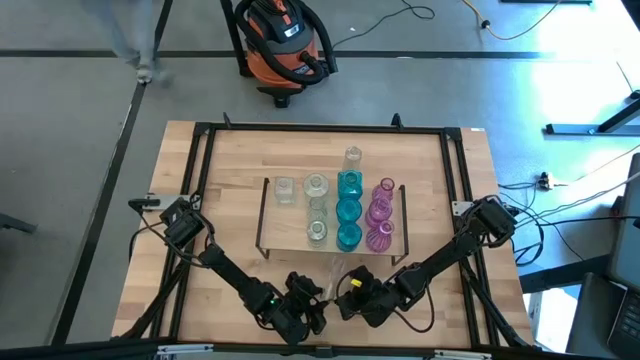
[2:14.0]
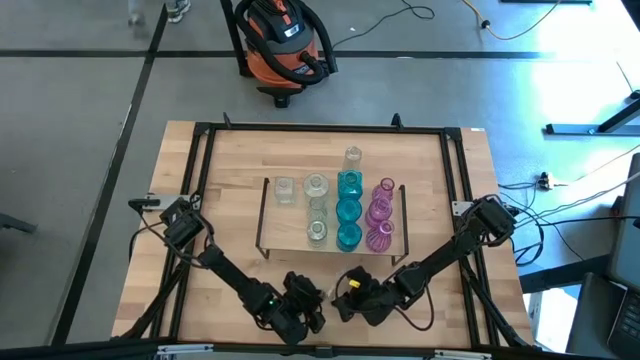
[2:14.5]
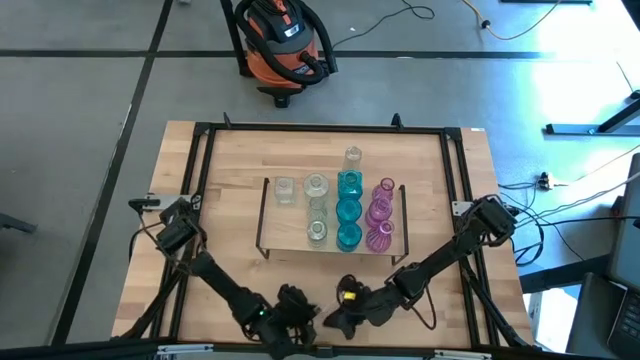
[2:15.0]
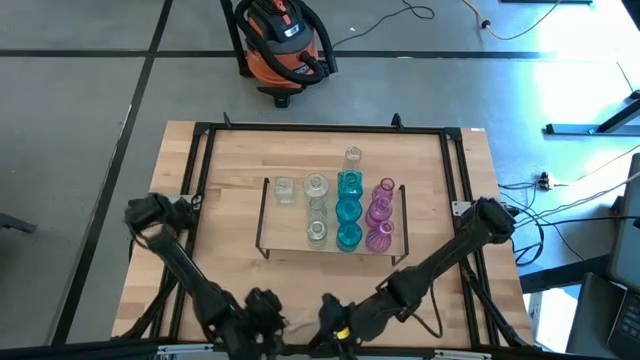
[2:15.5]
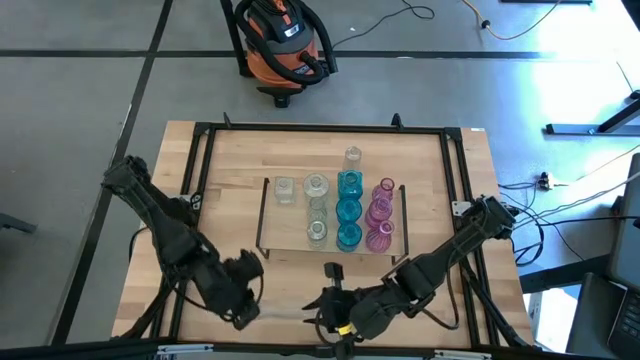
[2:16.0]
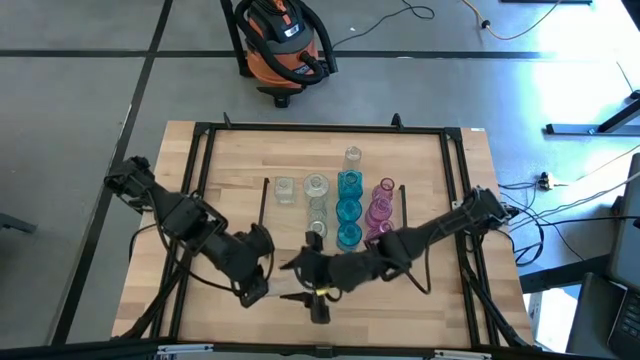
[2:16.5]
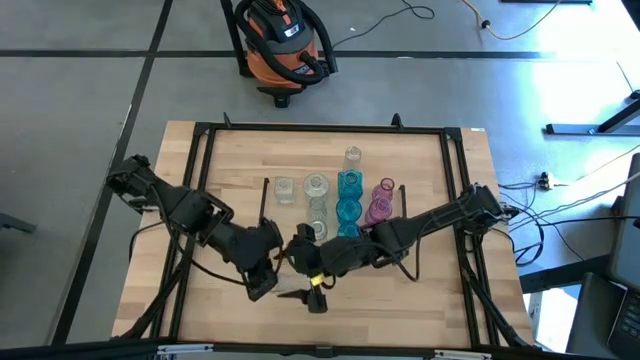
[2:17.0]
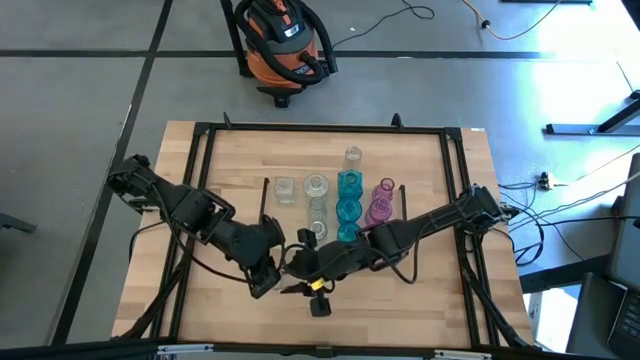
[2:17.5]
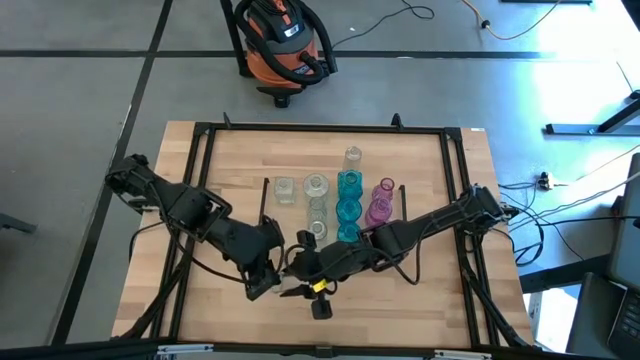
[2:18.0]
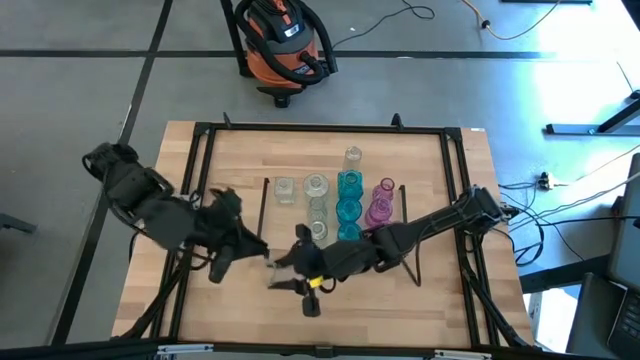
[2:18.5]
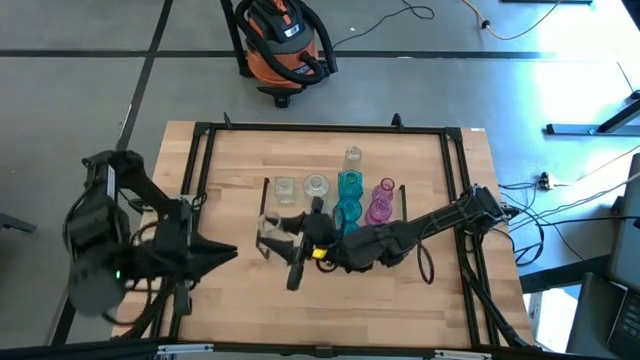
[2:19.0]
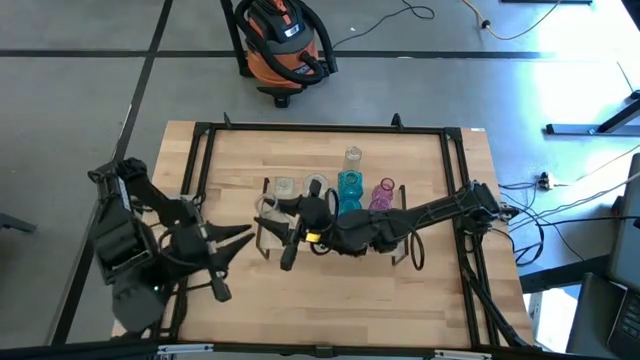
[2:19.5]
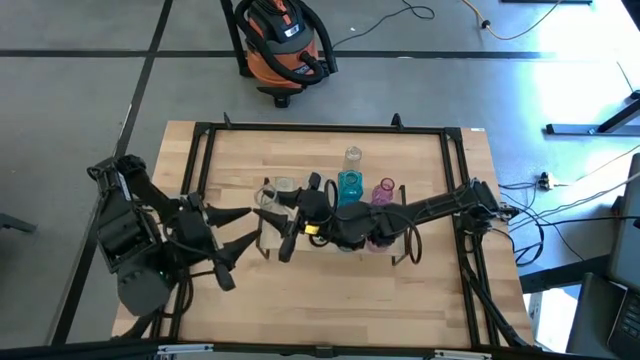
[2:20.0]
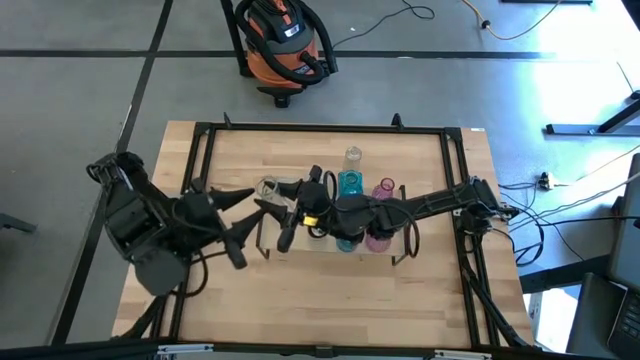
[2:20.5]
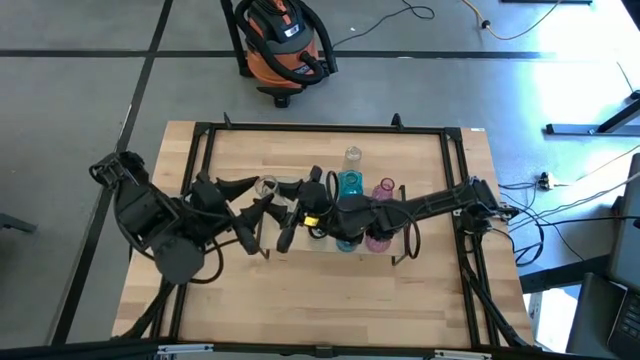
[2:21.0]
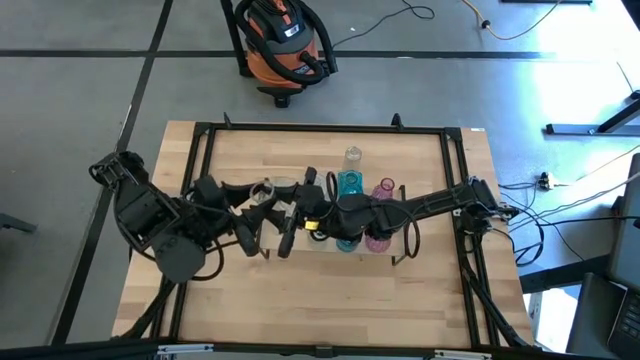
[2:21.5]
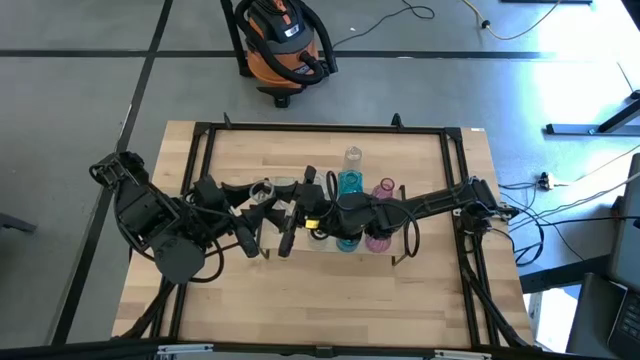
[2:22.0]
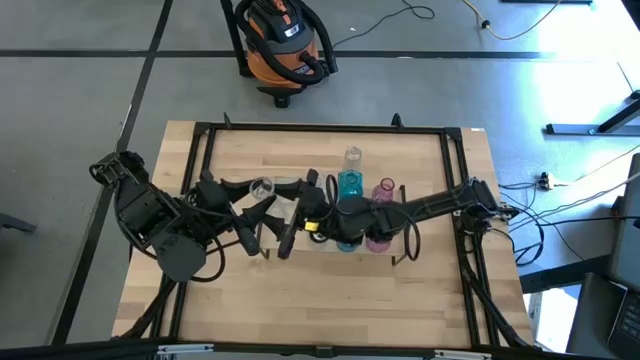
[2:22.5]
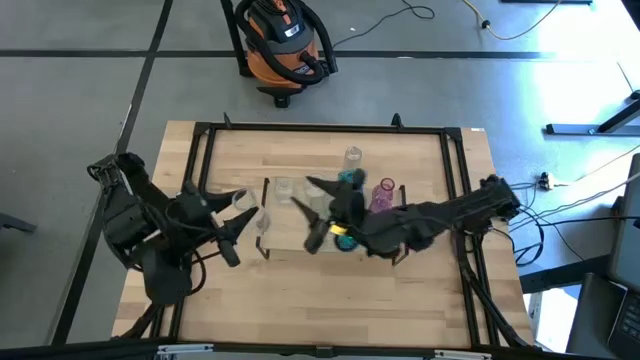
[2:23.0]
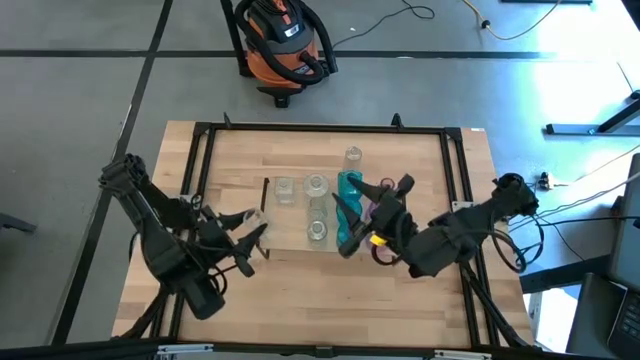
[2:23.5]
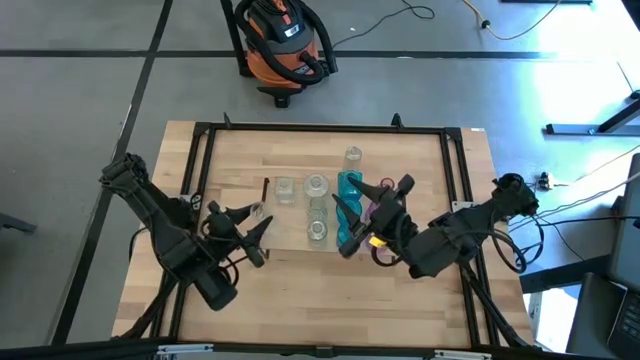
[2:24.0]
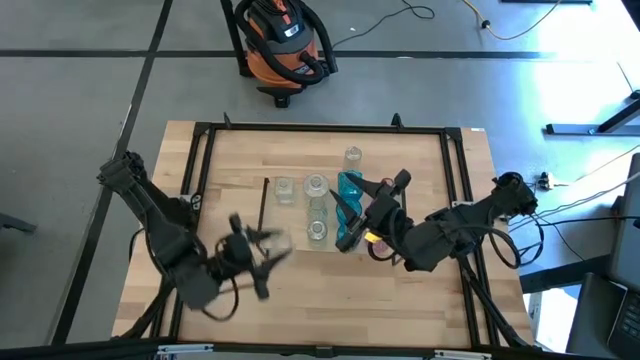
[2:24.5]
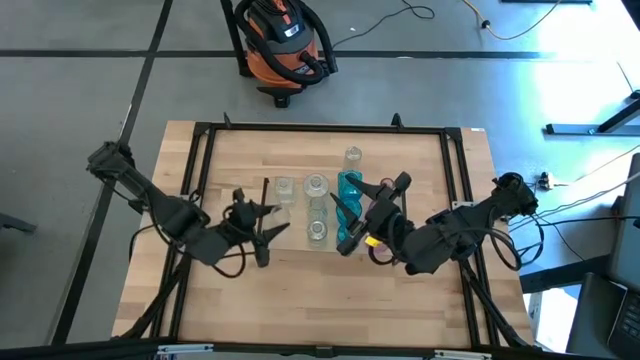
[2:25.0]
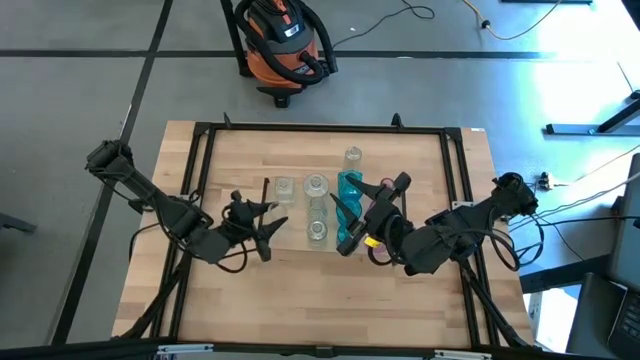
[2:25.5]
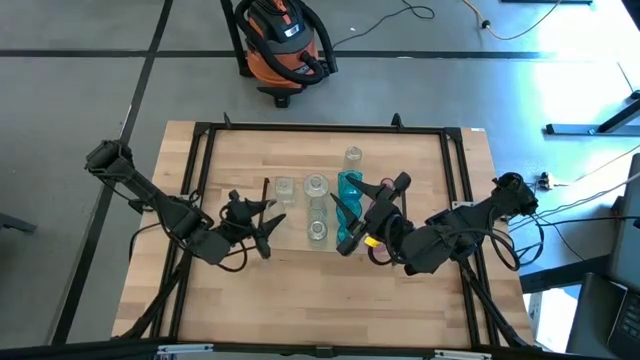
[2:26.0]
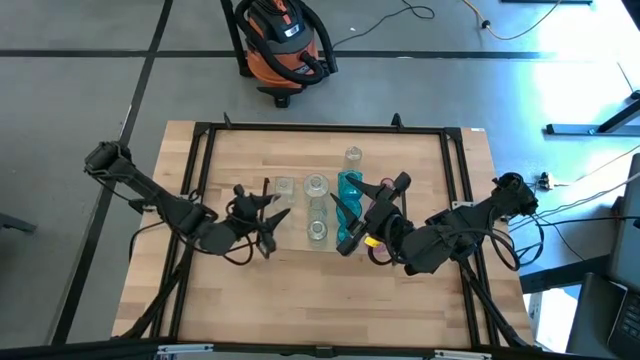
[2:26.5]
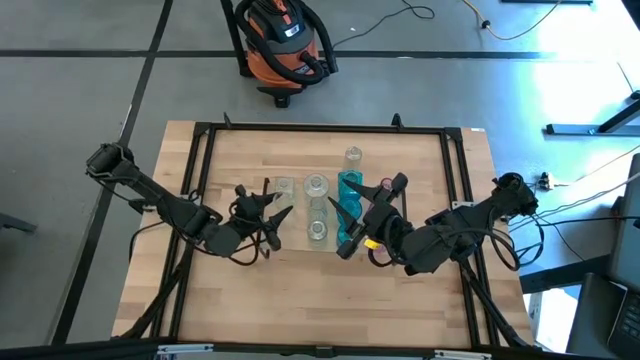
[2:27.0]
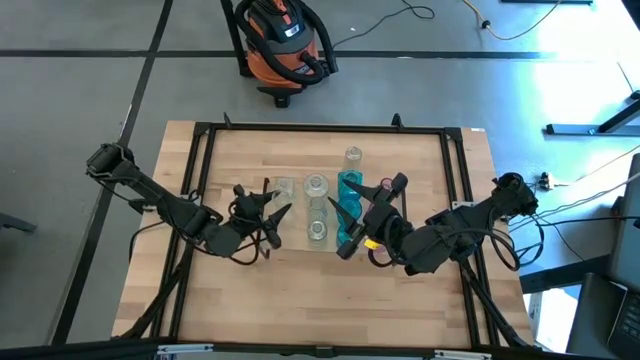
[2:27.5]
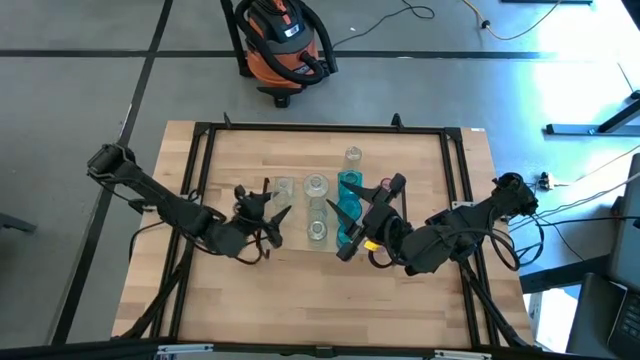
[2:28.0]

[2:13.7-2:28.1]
Task: sort vases onto shelf
Put the bottom transparent flower vase on the shelf

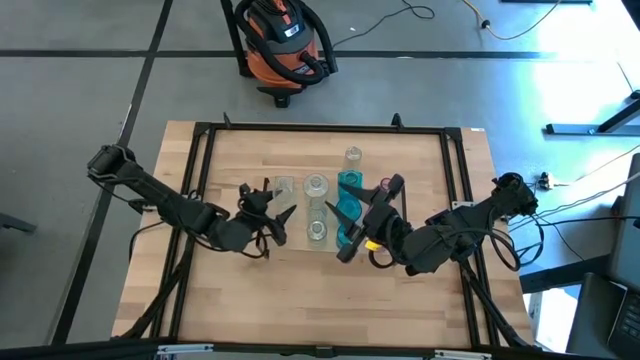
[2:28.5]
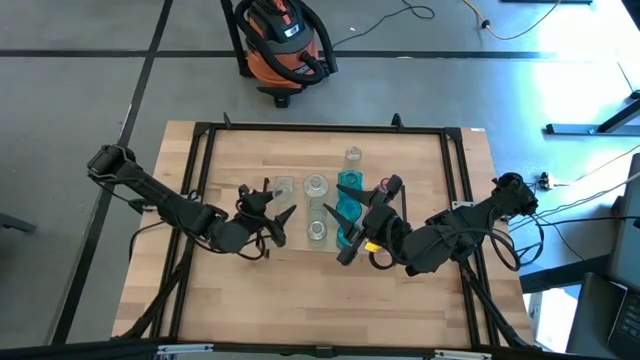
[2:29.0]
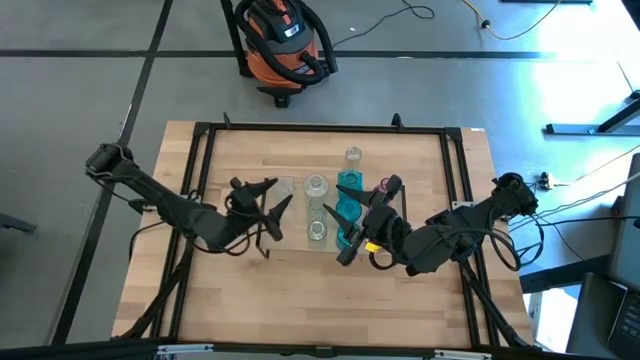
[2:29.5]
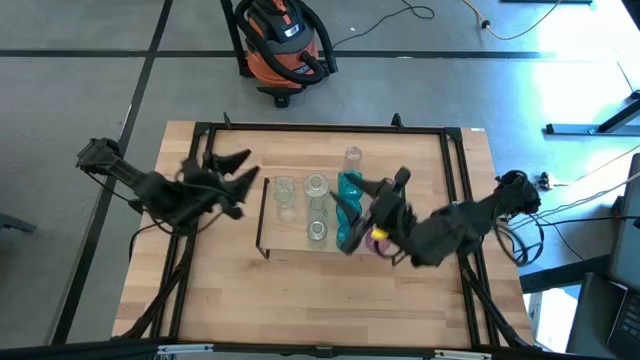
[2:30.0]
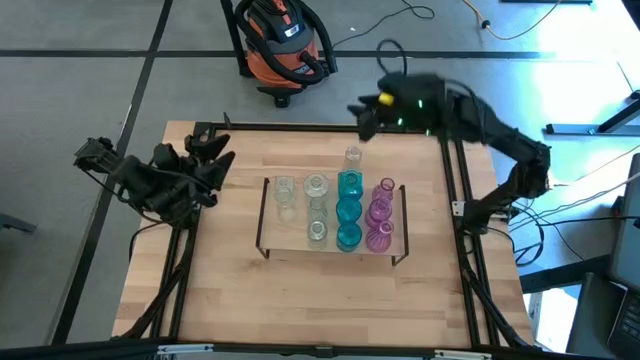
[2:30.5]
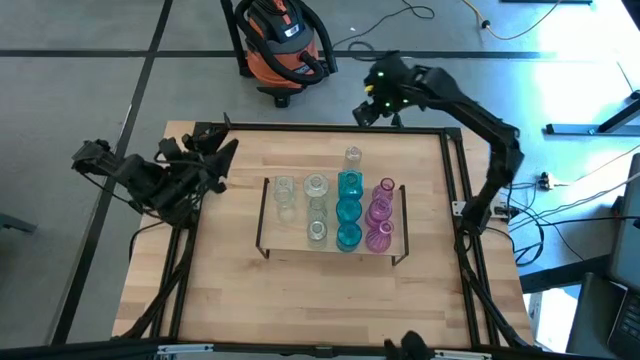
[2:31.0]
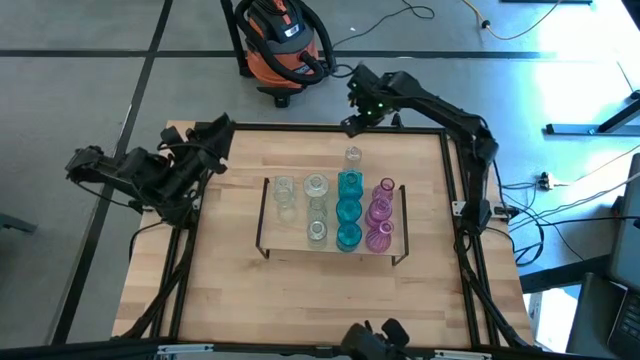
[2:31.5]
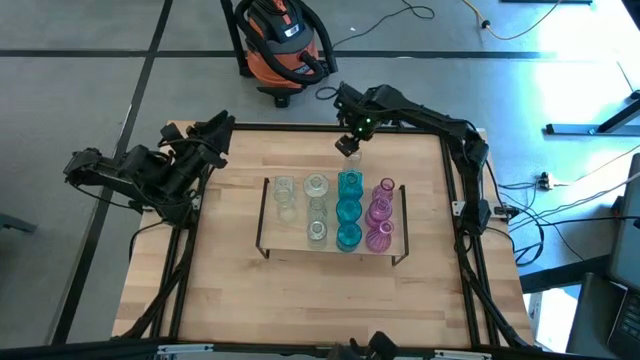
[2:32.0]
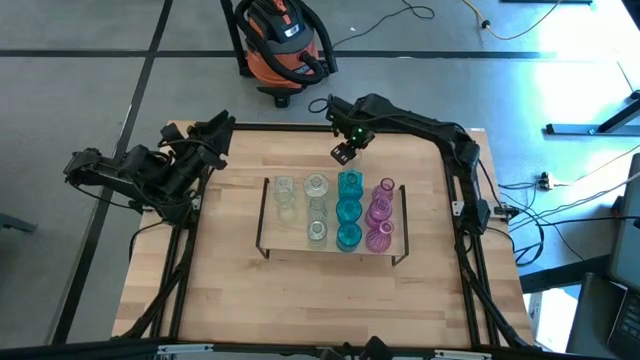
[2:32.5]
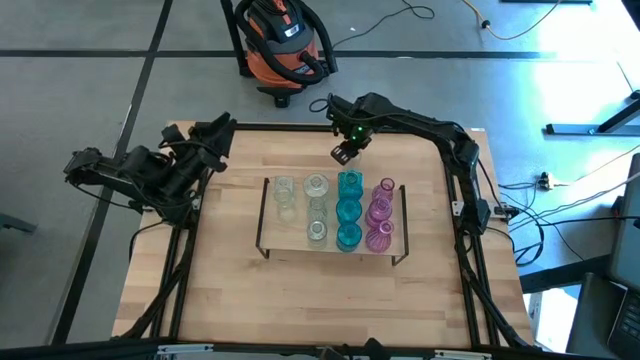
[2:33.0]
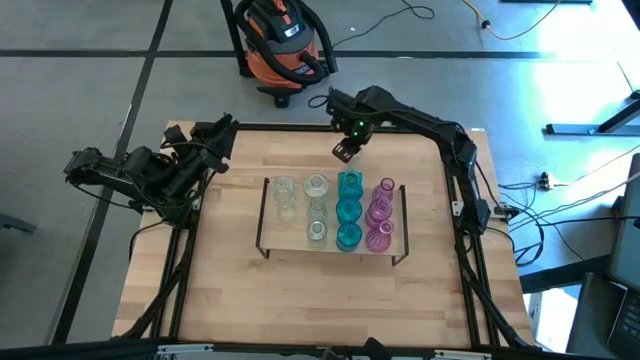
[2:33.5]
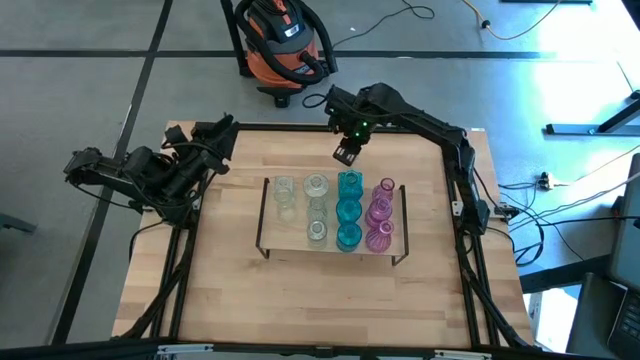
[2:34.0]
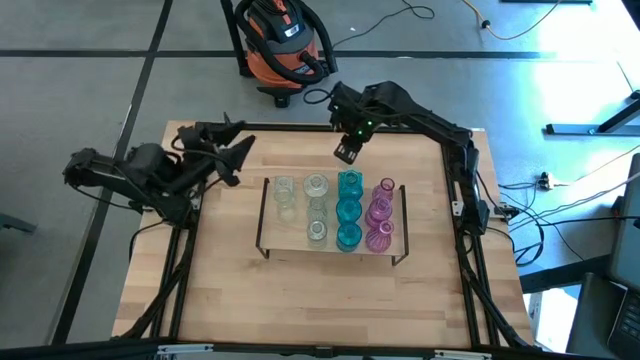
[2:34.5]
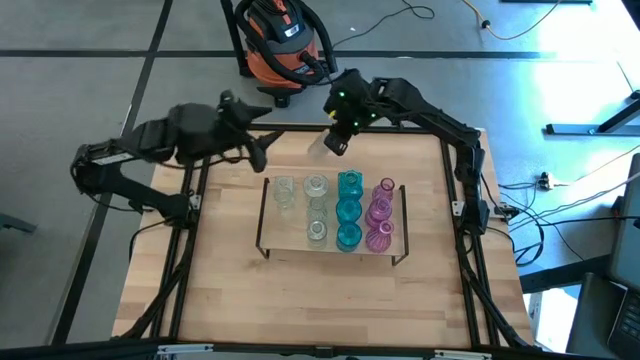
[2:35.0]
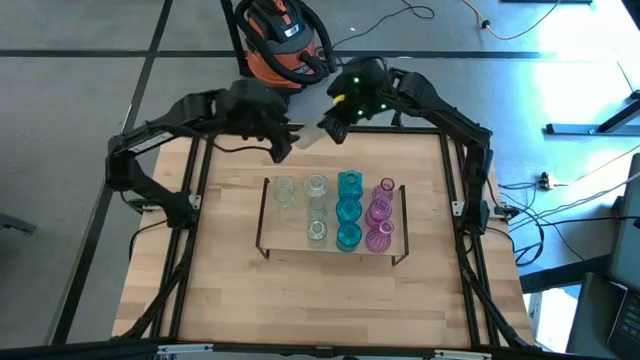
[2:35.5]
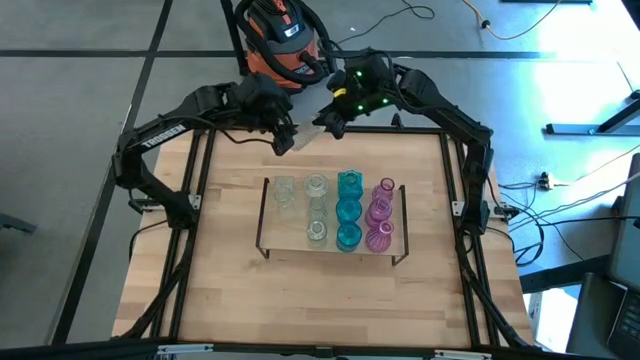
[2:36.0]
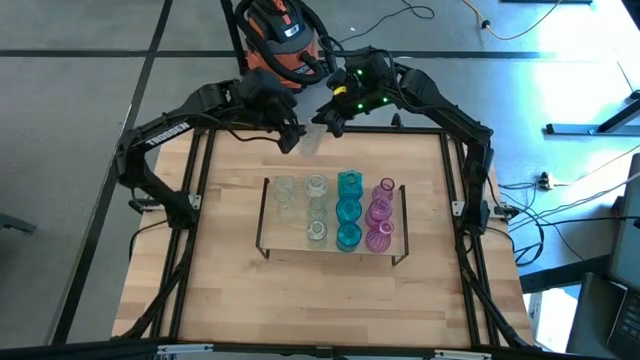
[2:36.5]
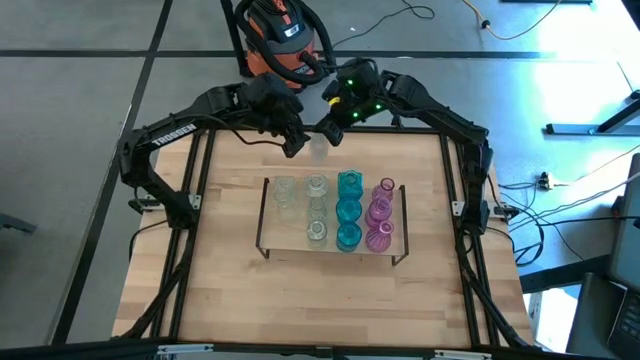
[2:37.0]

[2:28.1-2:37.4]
Put the transparent vase on the shelf
